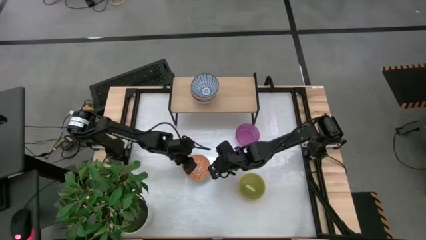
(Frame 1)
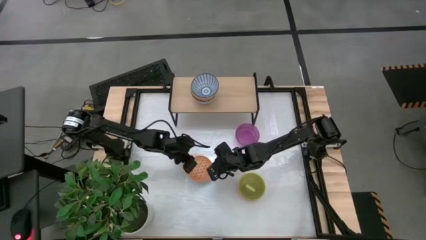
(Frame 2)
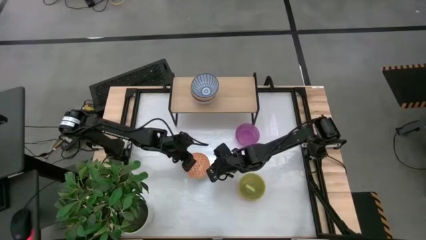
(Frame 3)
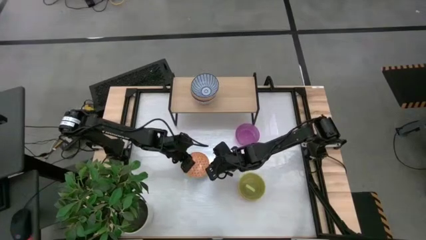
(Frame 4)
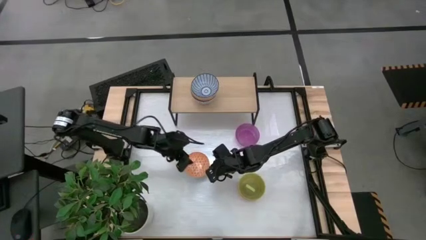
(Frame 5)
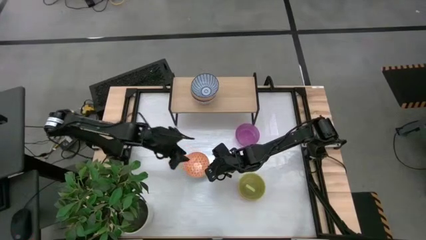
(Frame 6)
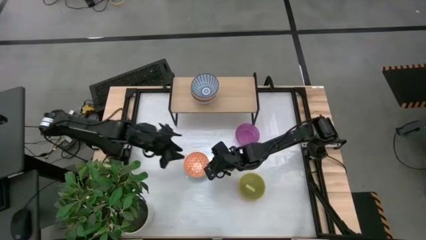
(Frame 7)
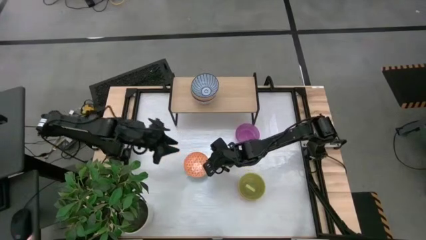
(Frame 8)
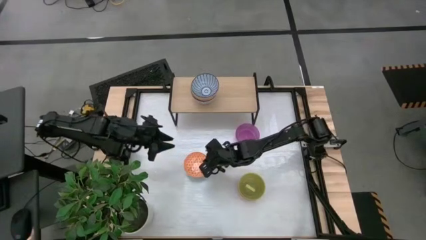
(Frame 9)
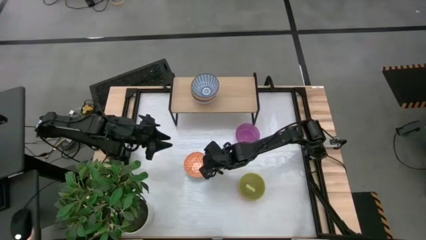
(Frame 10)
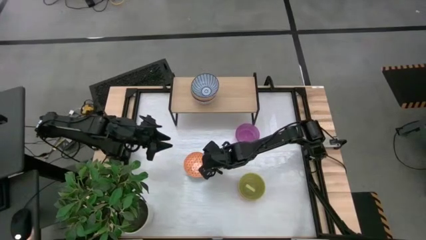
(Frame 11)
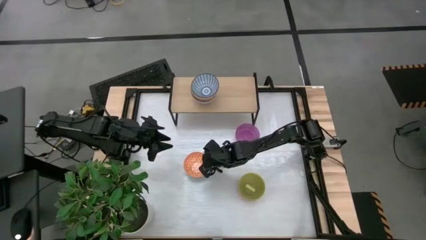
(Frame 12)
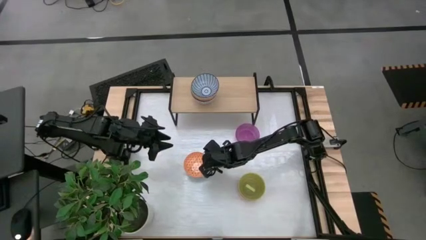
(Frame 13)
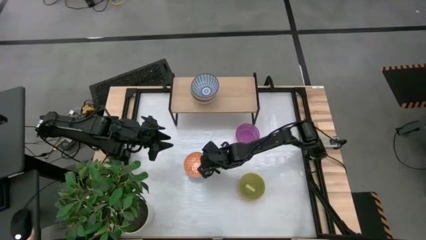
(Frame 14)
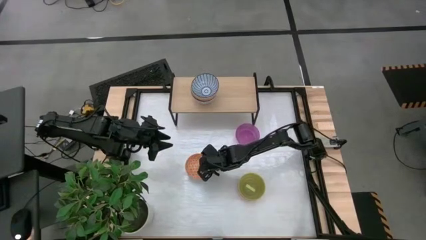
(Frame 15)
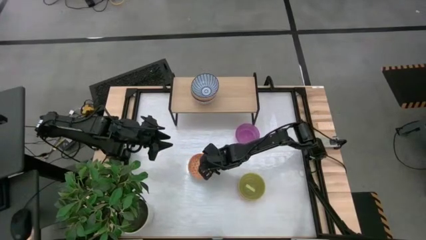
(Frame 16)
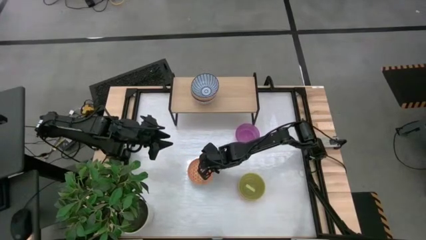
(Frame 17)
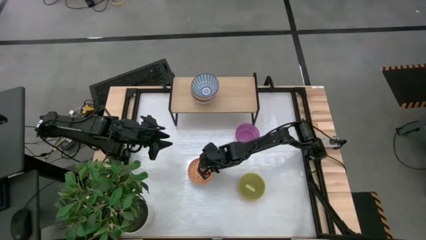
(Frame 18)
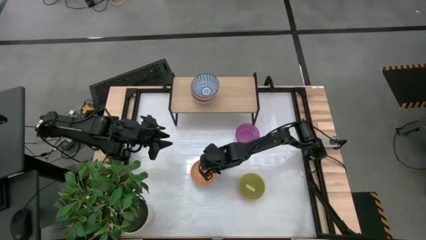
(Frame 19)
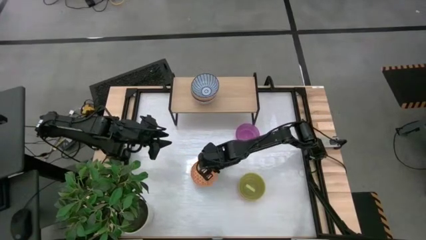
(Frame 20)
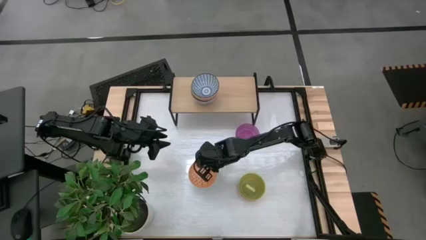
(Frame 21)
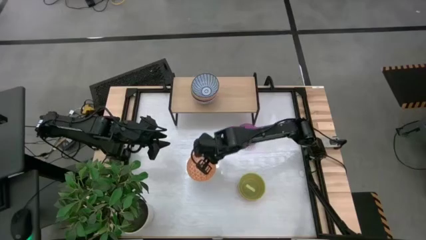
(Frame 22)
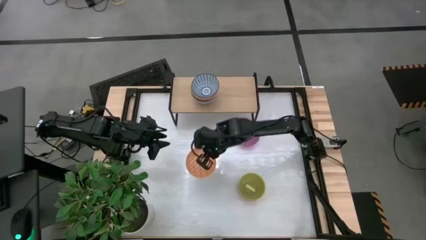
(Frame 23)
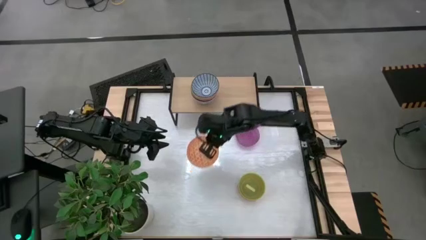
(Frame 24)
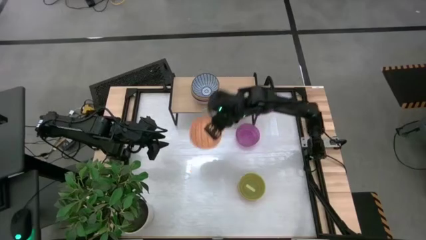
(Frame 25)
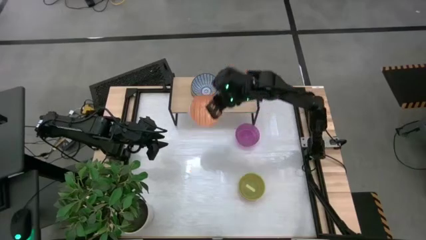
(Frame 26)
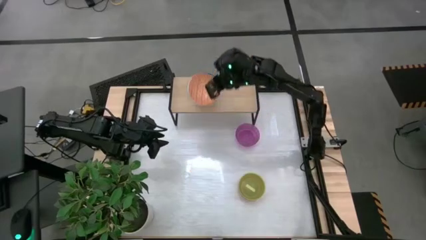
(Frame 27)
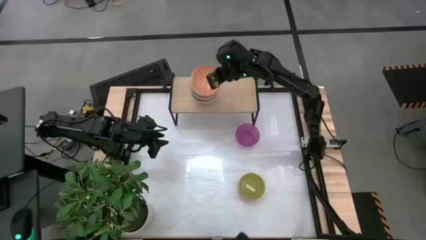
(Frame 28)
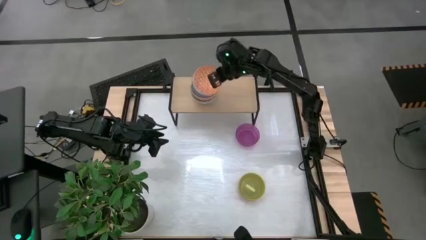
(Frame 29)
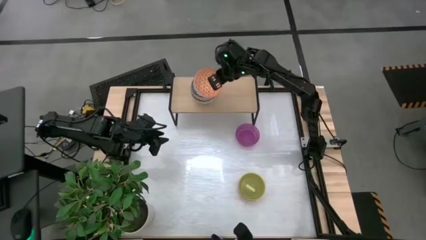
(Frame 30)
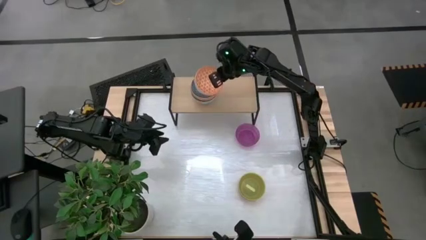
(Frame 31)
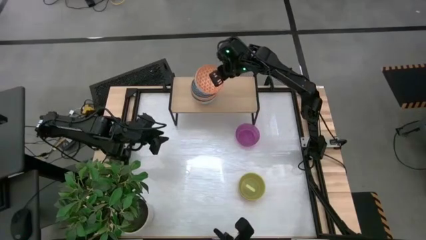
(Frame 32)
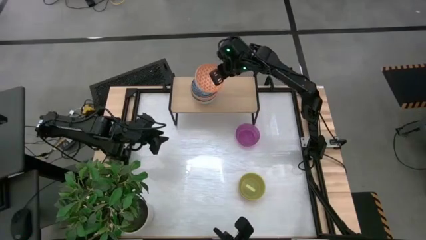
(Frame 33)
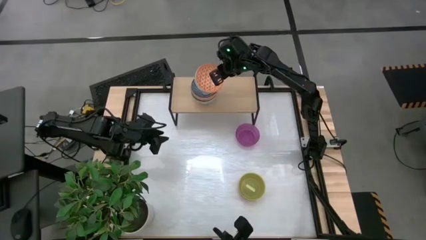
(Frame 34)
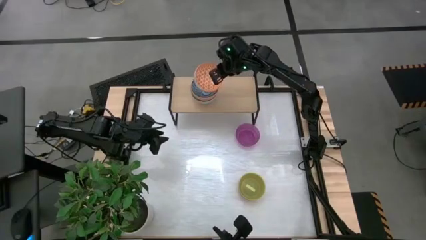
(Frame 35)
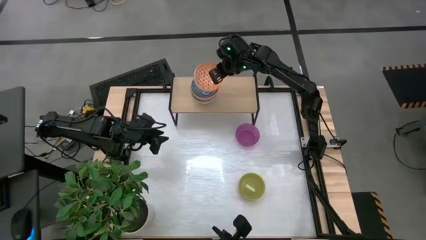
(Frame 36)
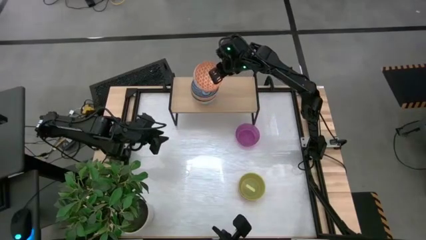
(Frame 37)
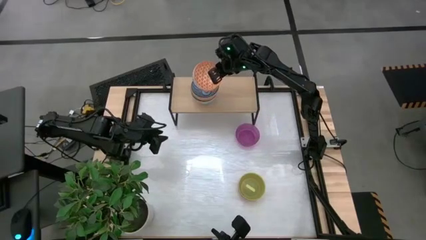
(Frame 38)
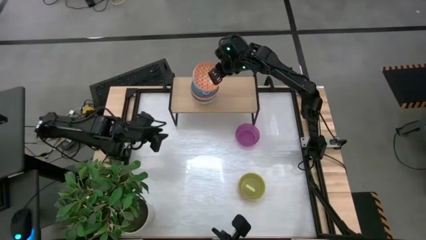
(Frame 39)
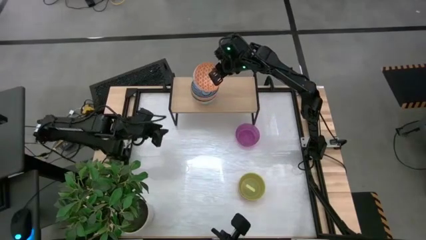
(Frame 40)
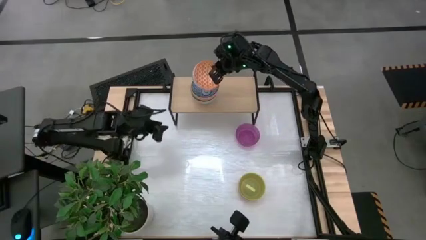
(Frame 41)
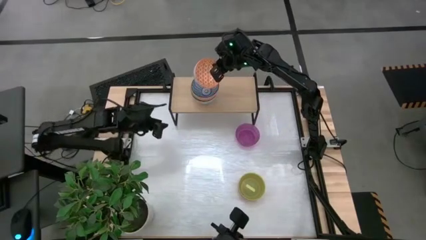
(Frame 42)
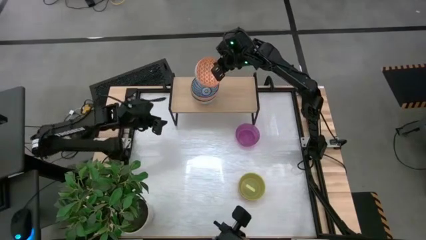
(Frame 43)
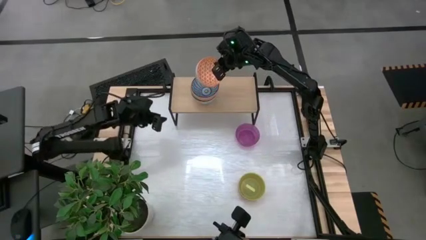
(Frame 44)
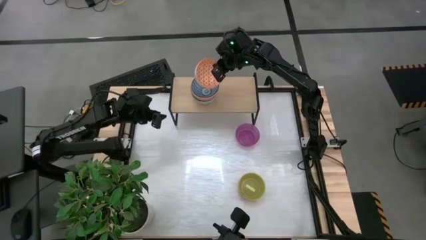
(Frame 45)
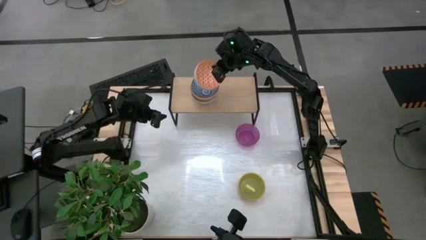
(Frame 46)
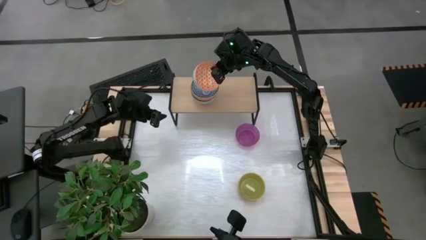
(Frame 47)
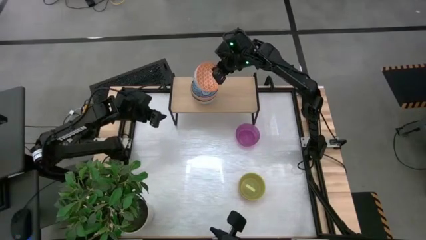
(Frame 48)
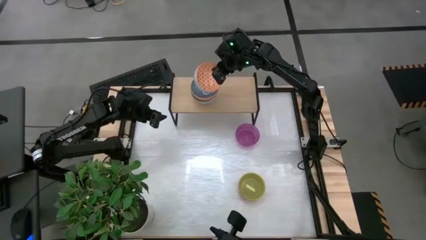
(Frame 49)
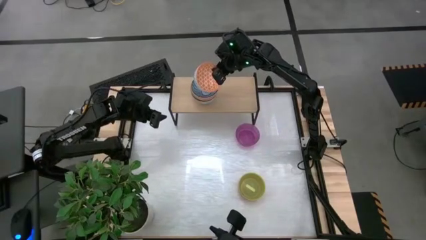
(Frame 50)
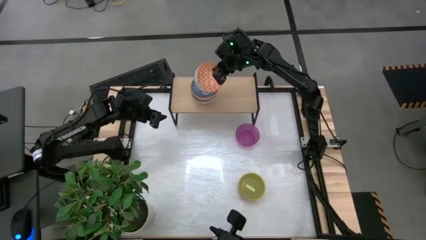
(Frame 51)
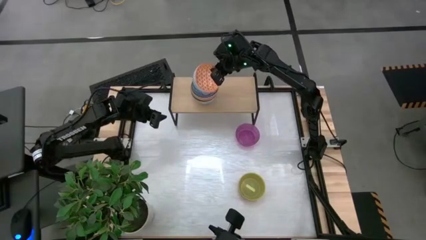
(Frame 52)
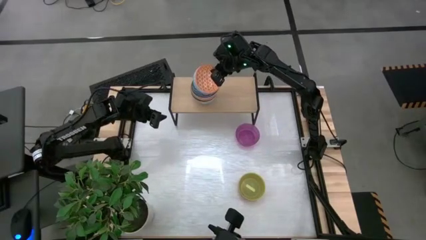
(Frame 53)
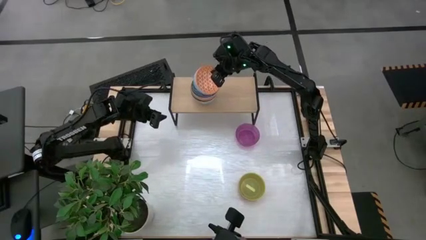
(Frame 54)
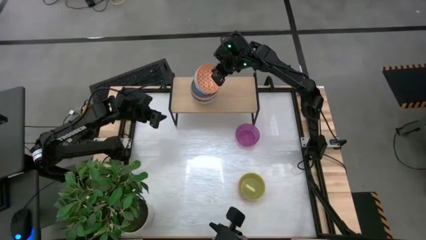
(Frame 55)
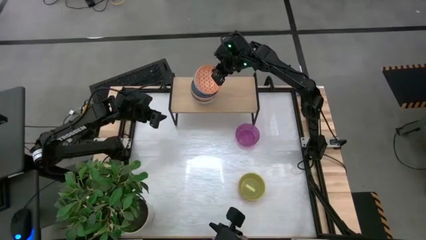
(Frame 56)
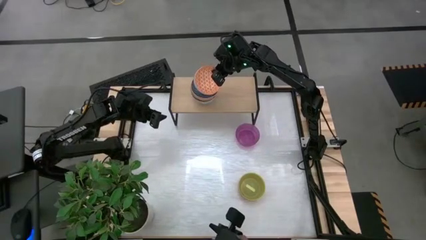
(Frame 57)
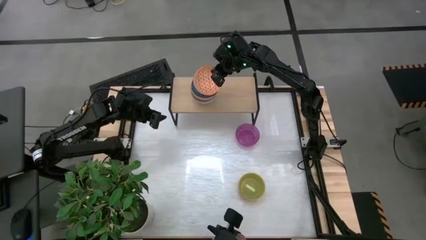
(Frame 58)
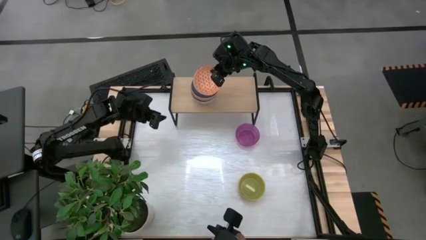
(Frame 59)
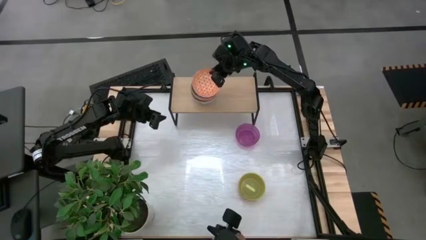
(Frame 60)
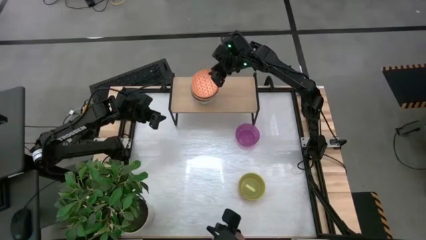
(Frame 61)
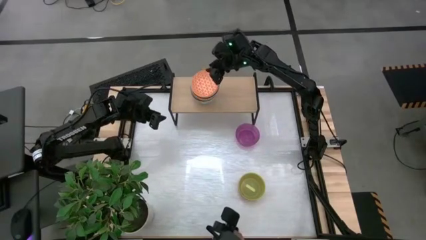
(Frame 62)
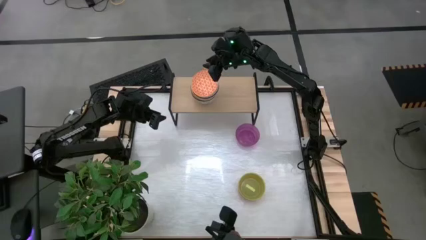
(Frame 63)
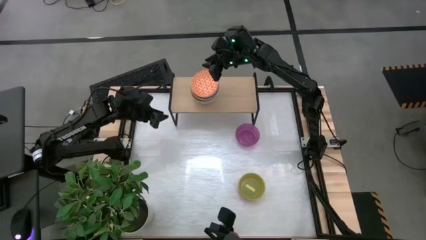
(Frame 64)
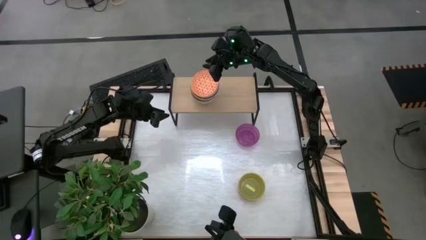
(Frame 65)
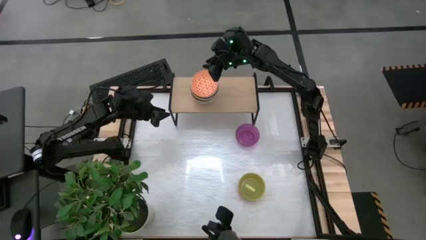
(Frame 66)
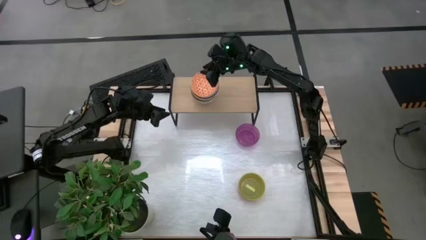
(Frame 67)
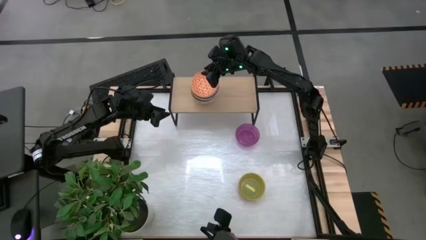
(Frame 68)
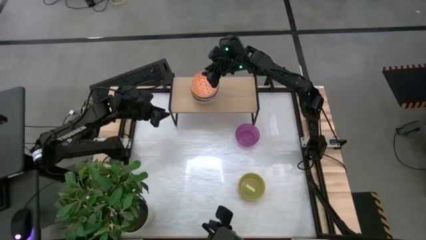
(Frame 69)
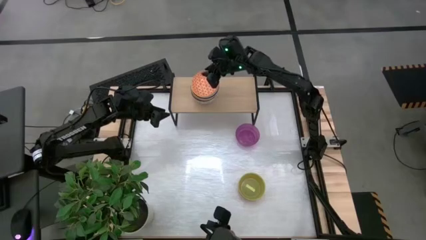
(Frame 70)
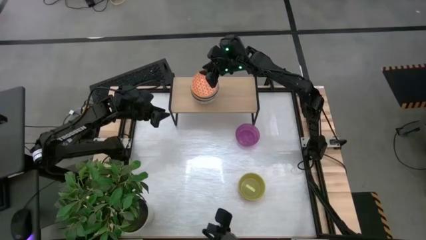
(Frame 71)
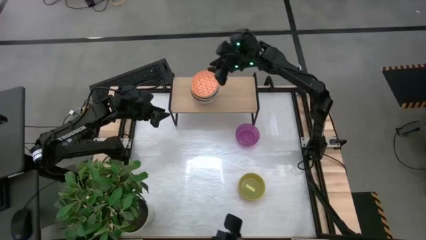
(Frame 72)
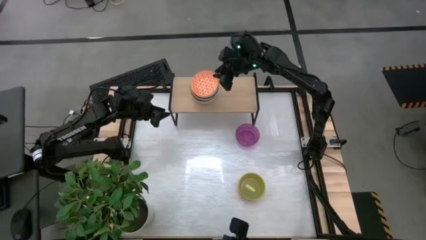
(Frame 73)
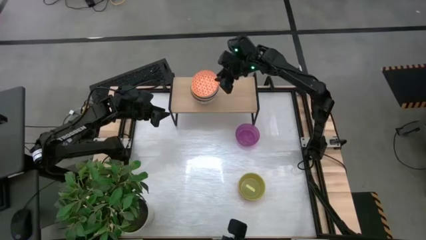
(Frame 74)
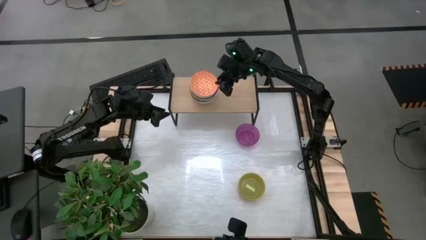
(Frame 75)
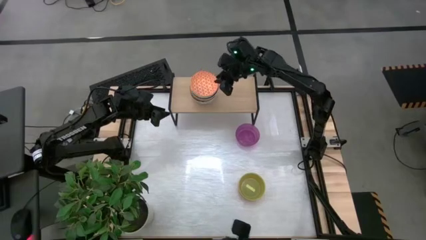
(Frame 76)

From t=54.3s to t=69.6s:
Task: Place and stack bowls onto a shelf
Stack the orange patterned bowl on top of the blue patterned bowl on the shelf

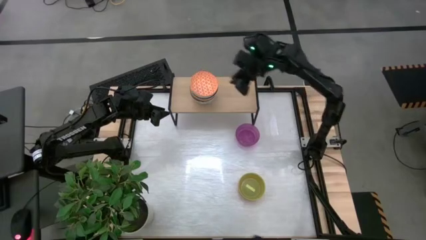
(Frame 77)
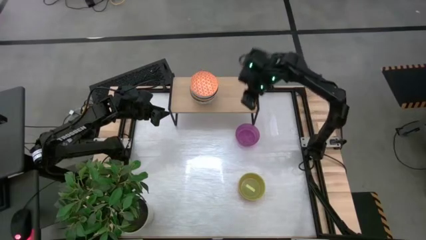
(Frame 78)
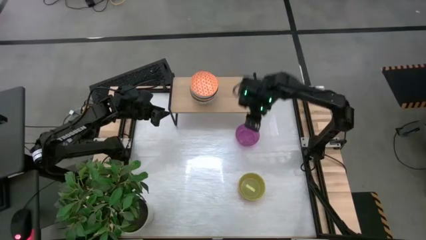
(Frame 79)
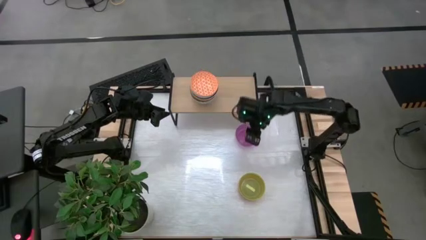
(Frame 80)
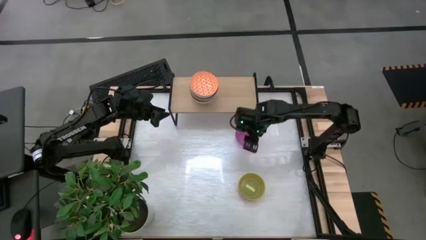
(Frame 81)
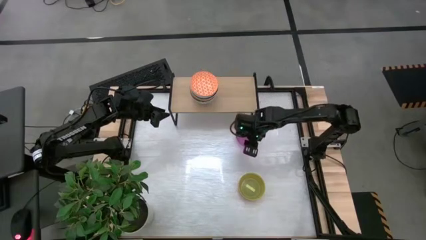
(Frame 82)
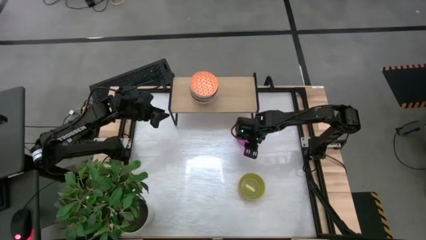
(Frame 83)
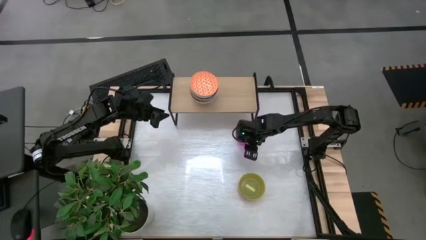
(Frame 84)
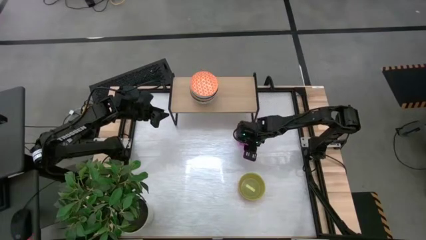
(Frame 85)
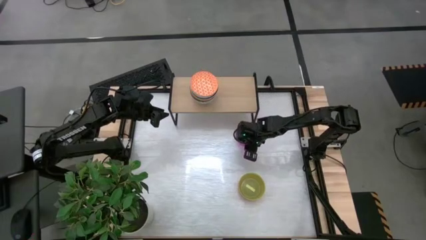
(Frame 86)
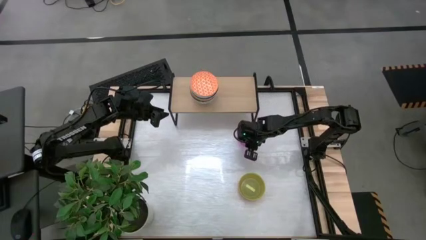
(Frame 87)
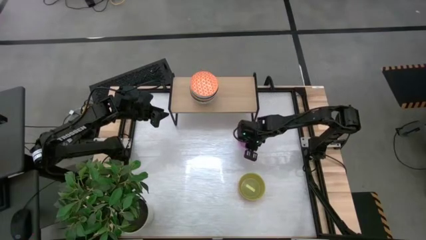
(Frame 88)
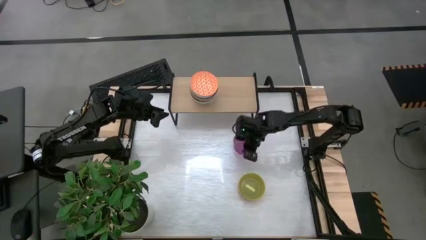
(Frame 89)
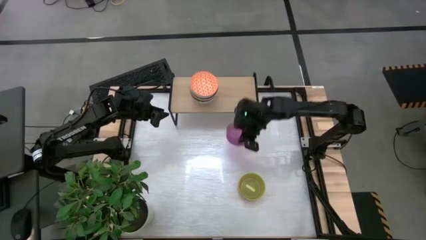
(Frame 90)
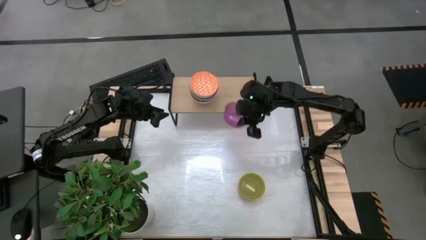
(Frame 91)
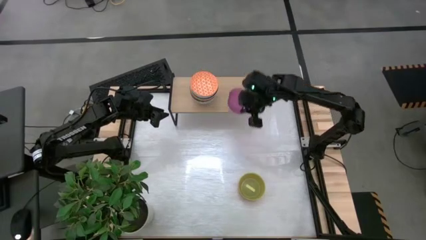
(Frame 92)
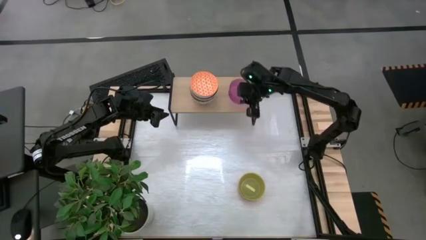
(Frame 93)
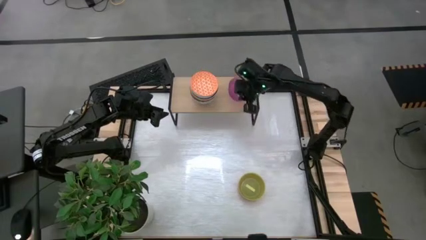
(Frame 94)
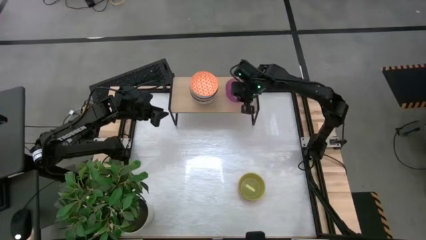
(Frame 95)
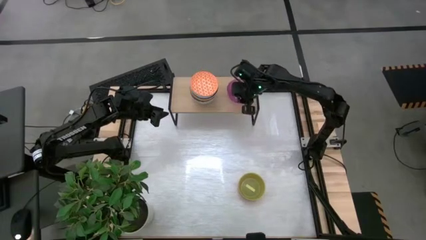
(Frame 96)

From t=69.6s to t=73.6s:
Put the violet bowl on the shelf
